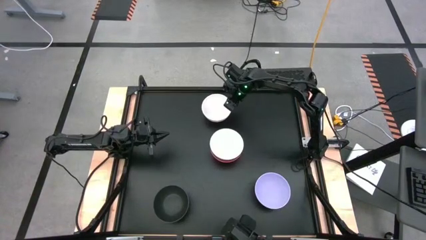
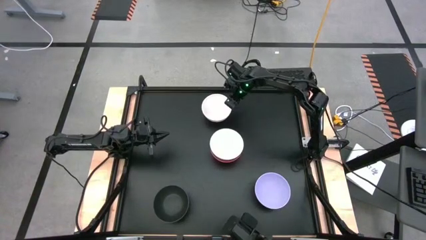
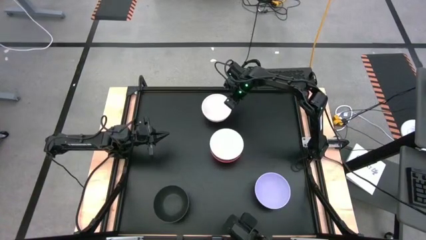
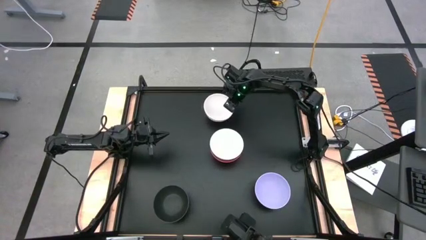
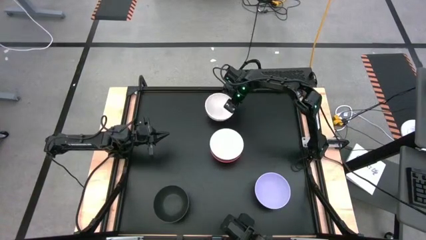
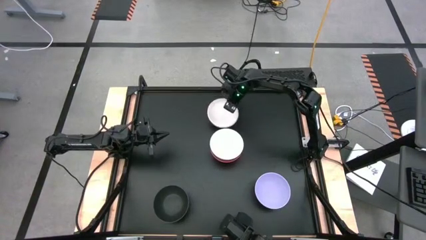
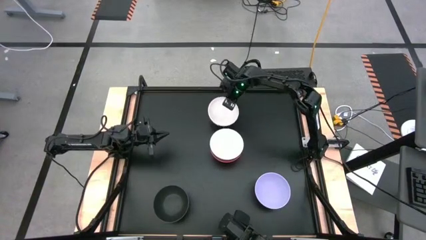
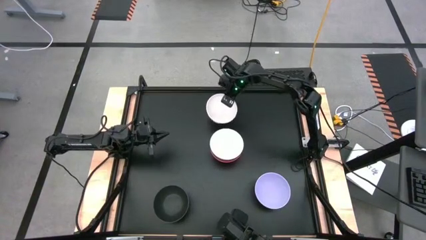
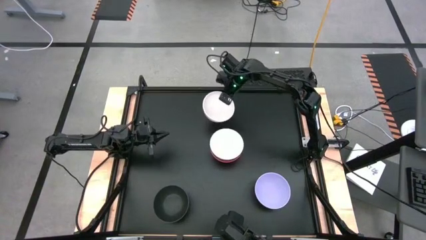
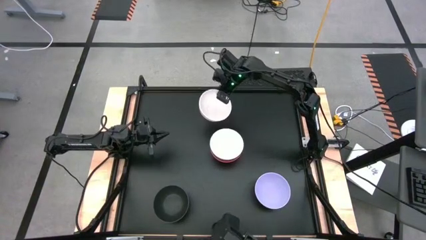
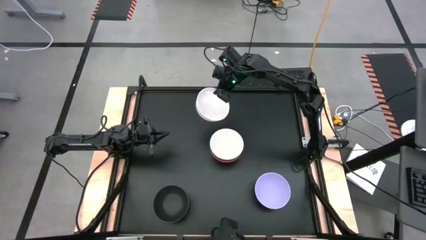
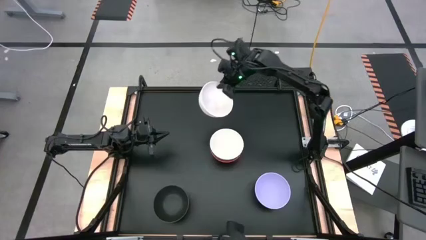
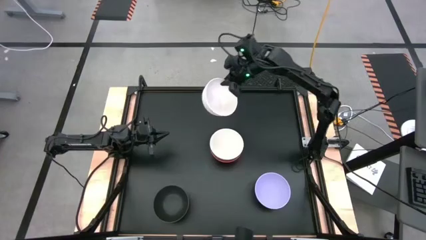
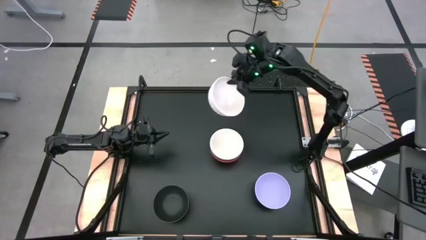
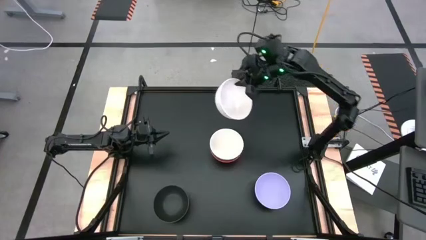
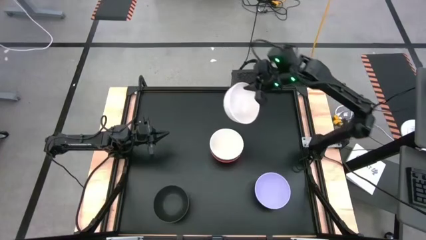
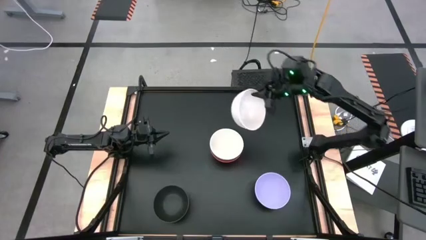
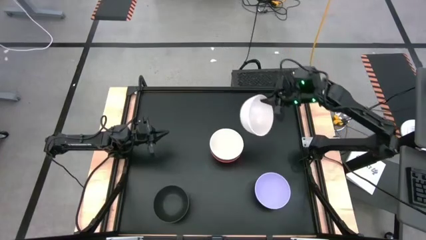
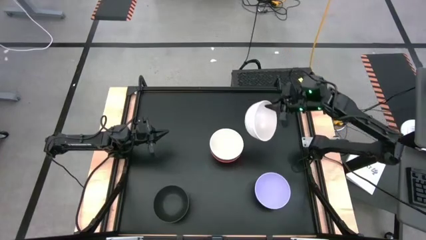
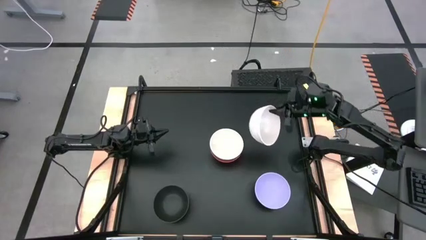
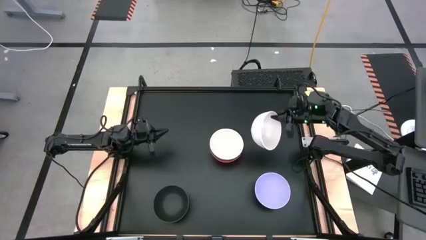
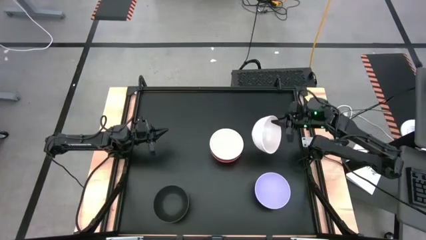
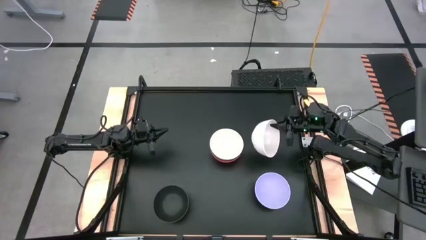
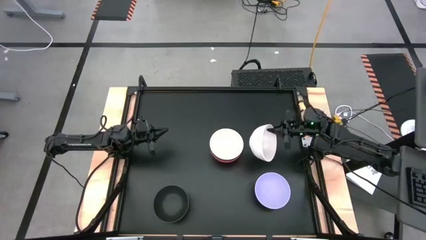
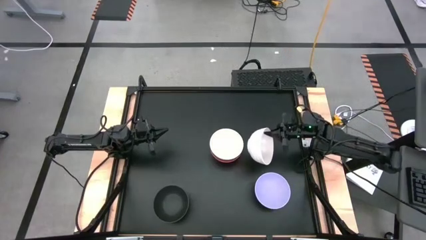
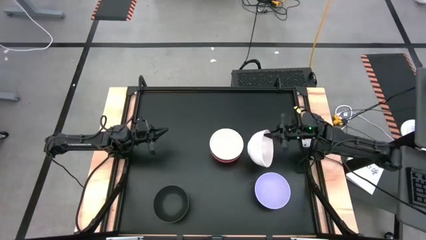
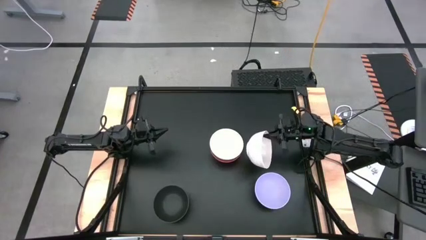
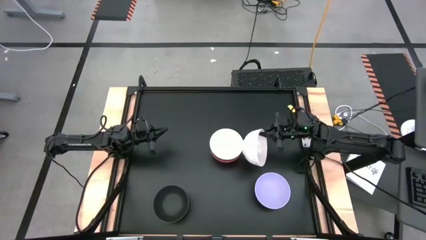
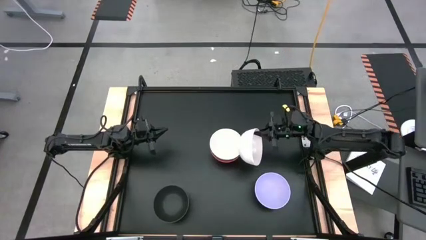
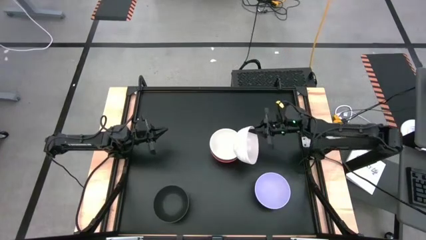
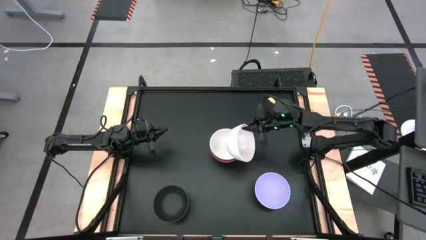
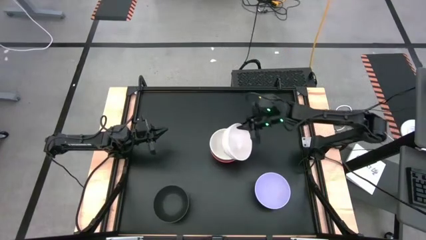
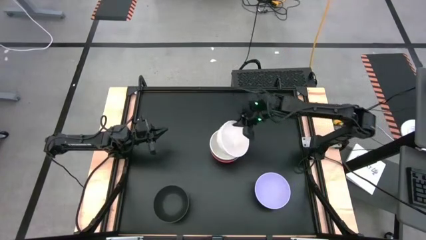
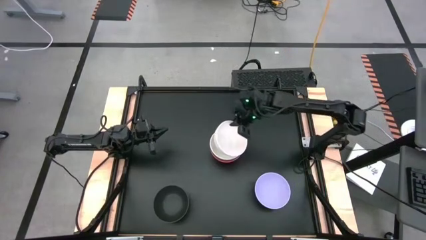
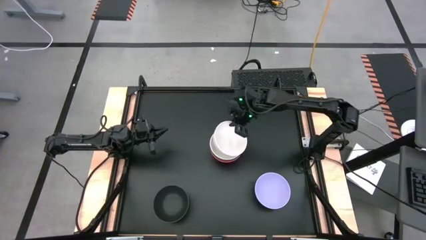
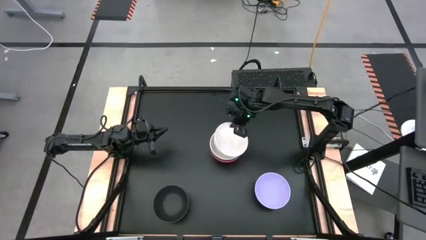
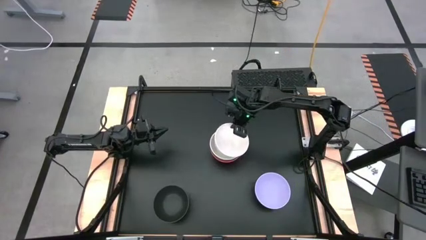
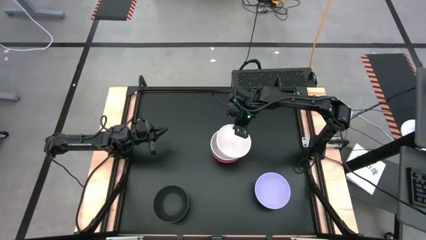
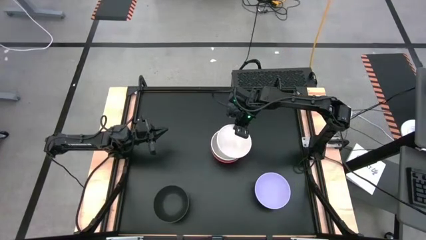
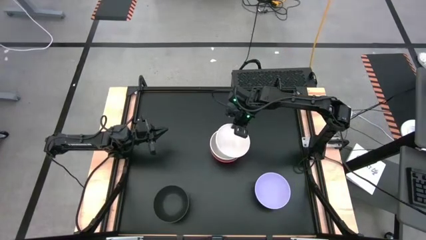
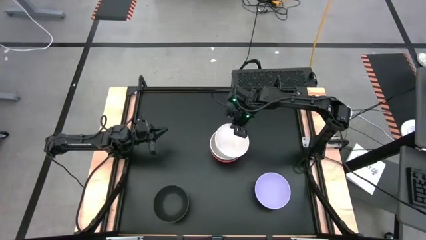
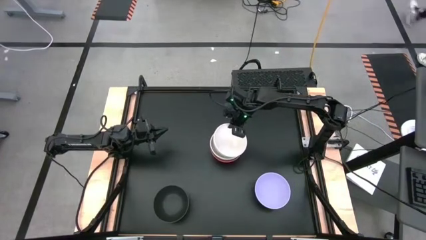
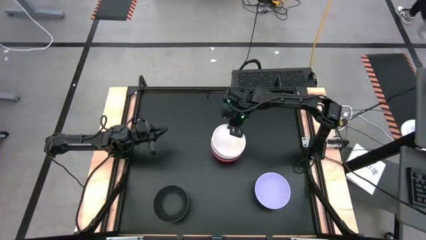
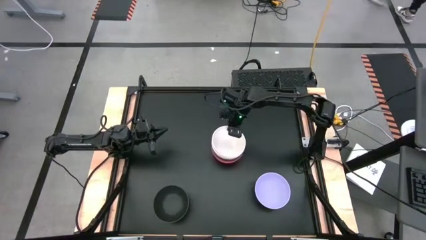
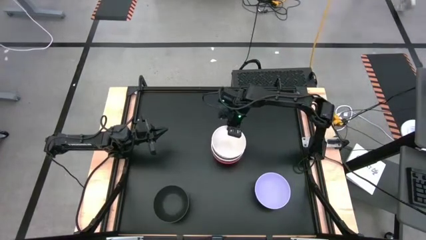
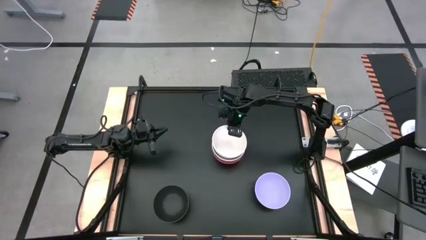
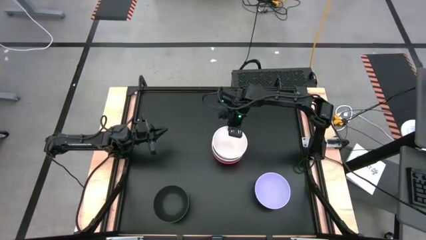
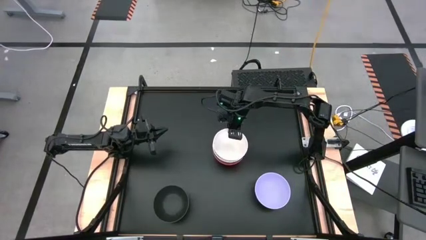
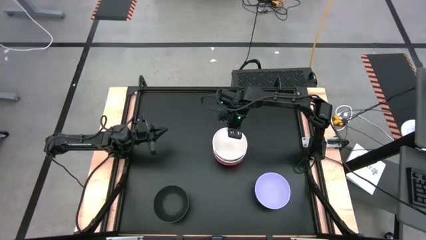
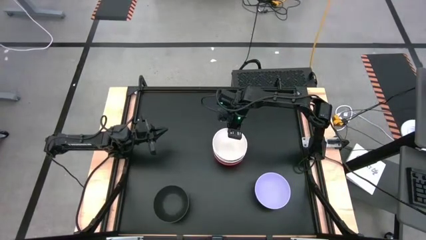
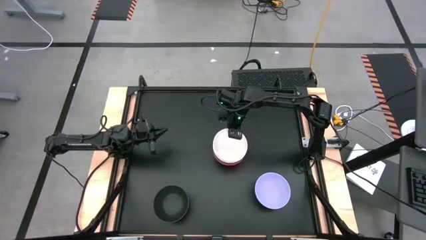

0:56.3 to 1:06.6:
Task: Nest bowls inside each other
Stack the white bowl on top of the white bowl

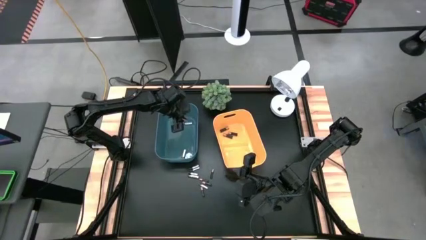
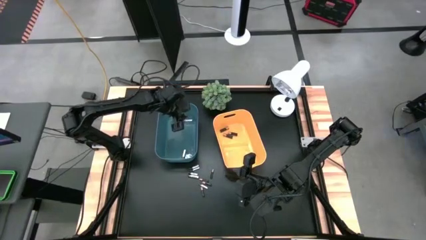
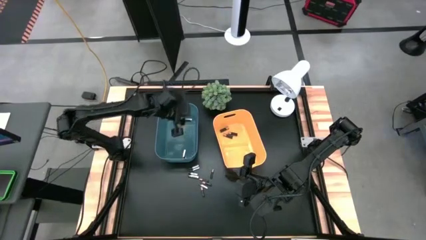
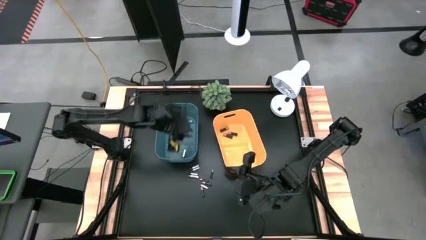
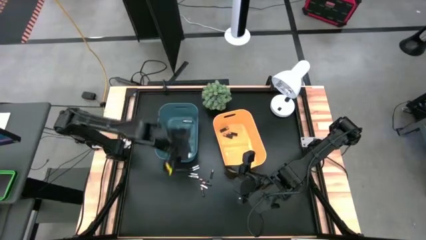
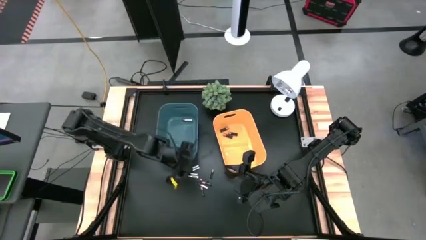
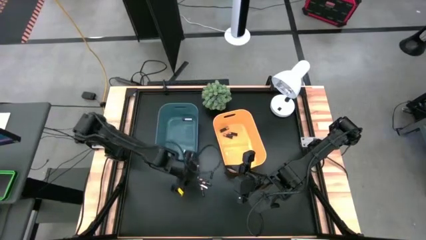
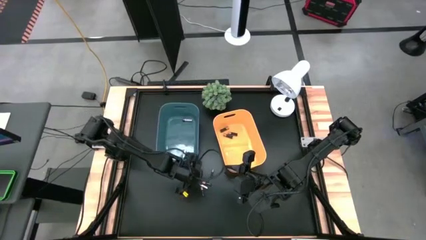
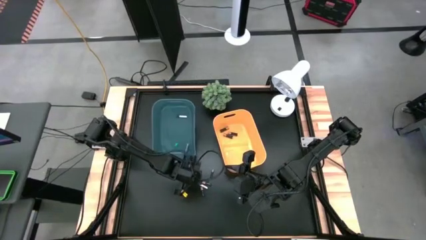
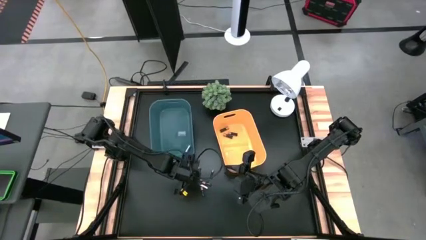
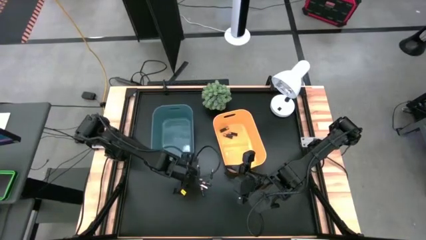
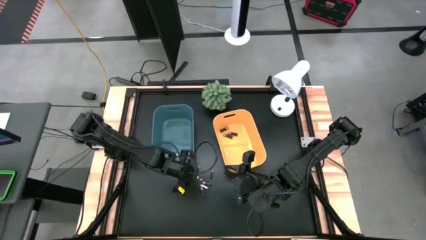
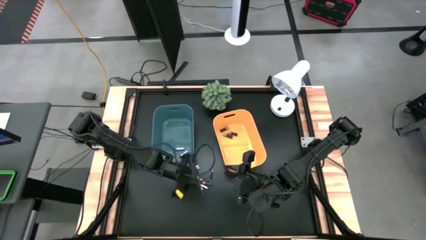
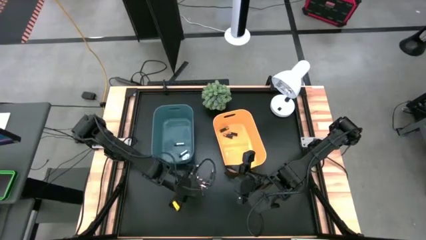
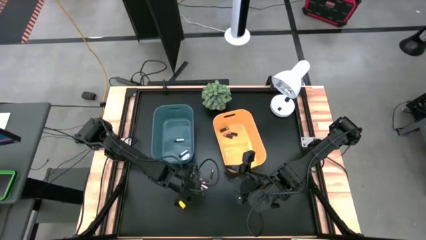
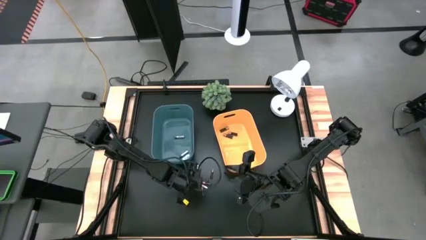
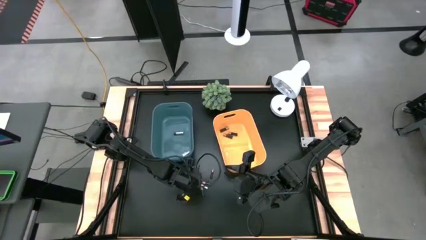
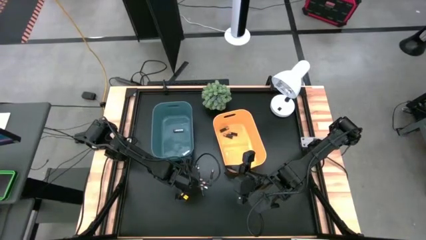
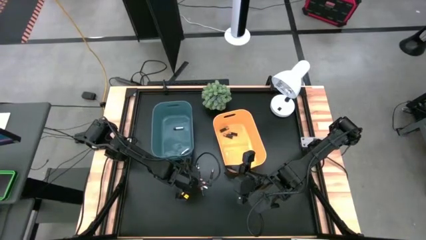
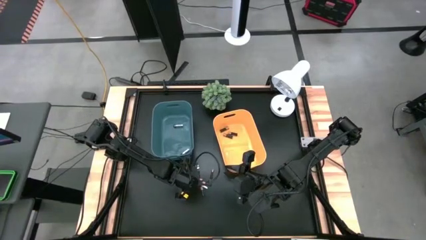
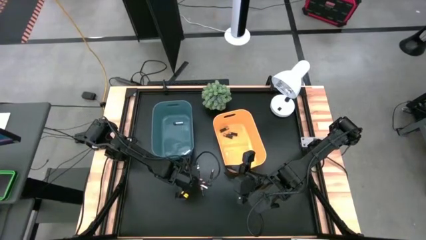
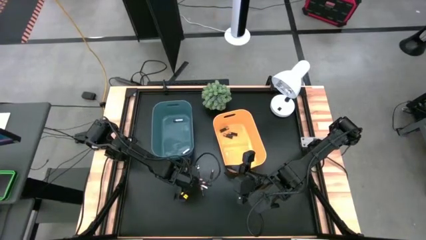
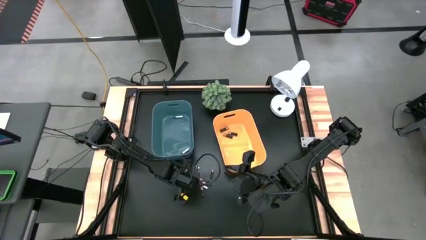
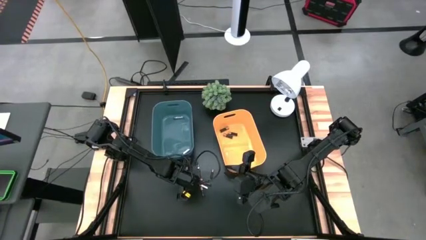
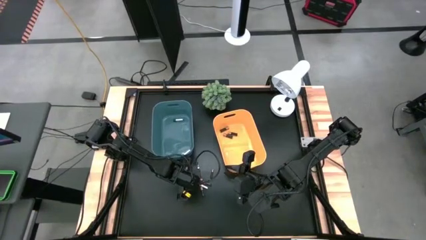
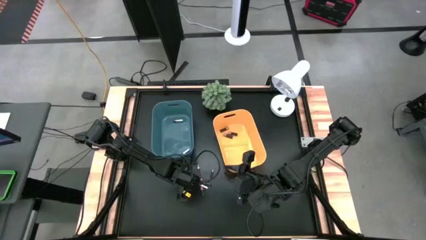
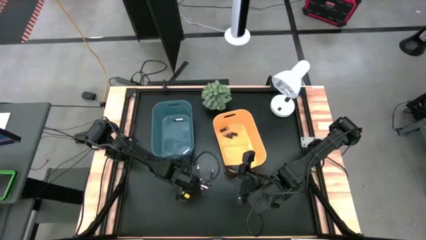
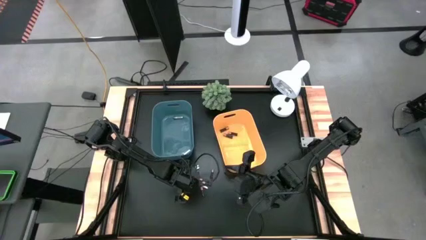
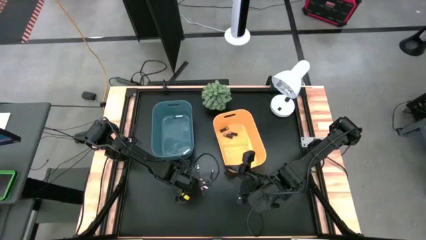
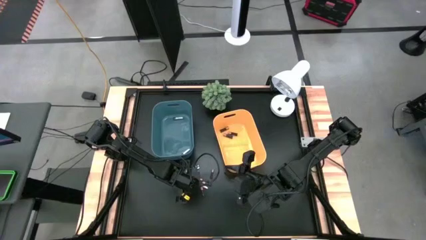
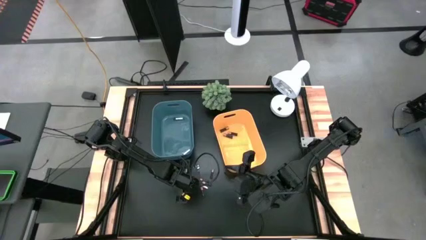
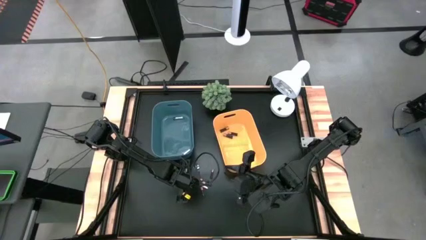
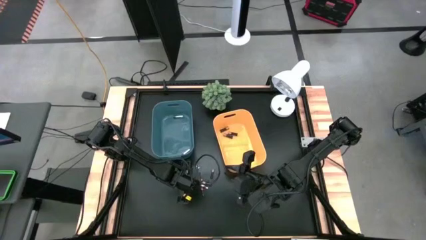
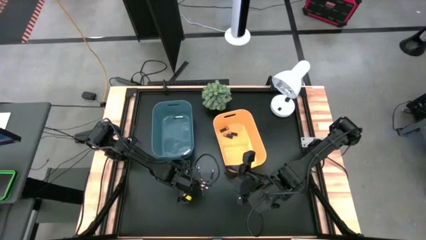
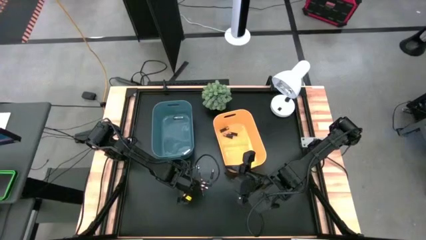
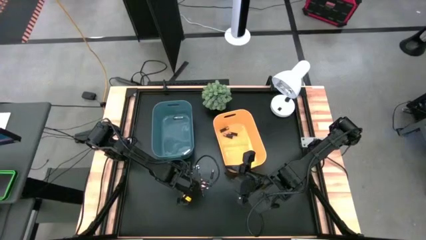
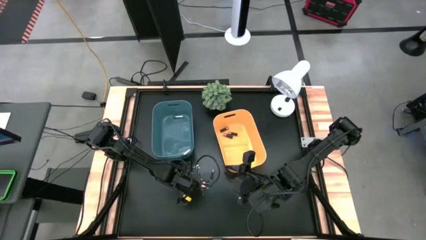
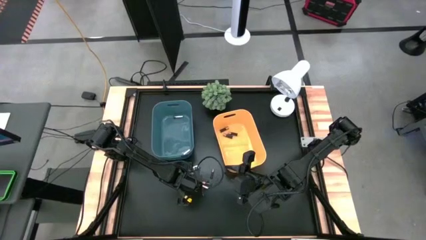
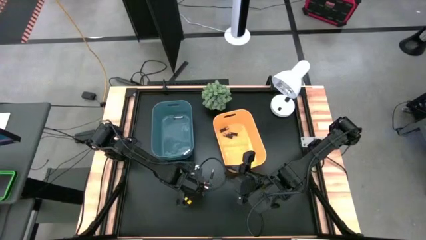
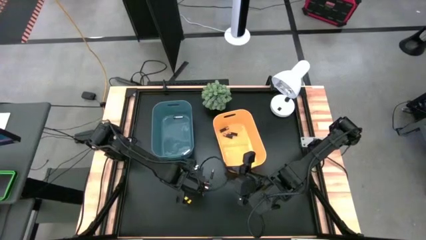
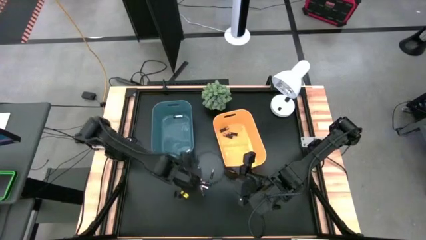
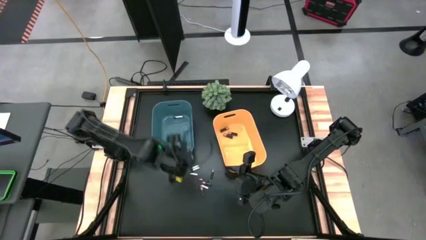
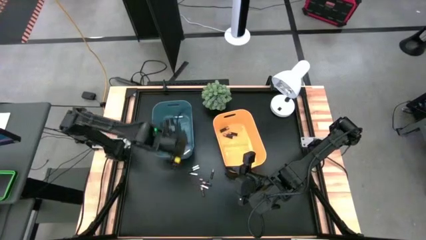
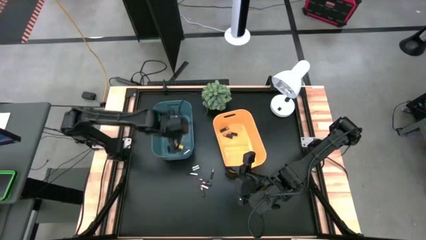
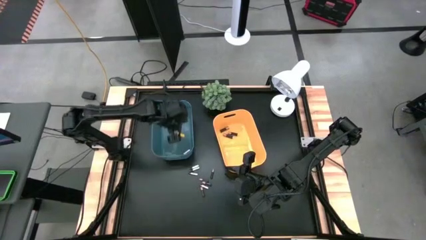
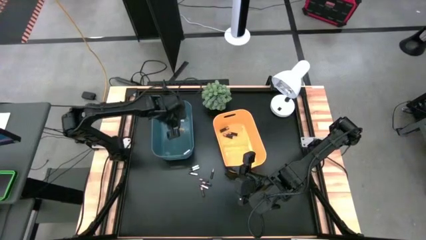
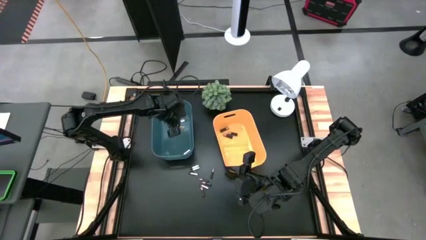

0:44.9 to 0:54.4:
Task: Sort batteries
Put the silver battery into the blue bin
